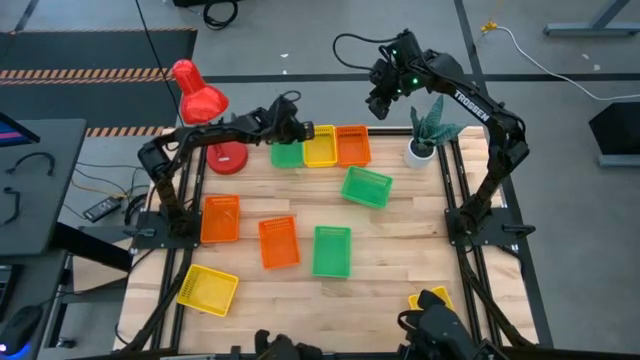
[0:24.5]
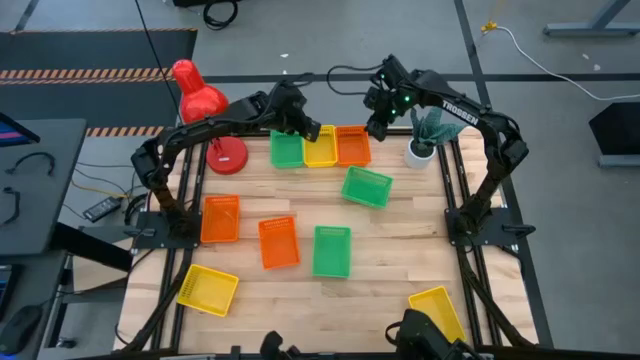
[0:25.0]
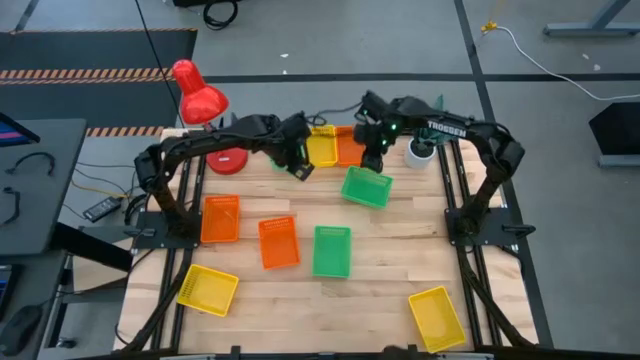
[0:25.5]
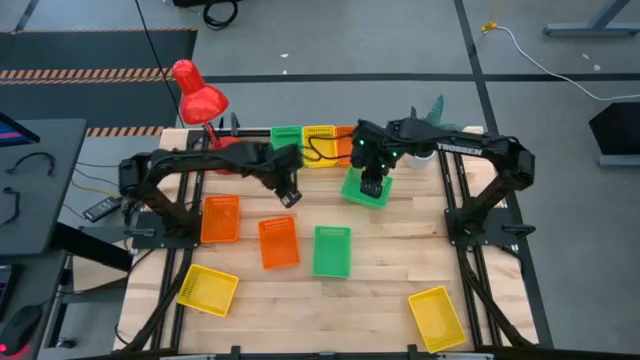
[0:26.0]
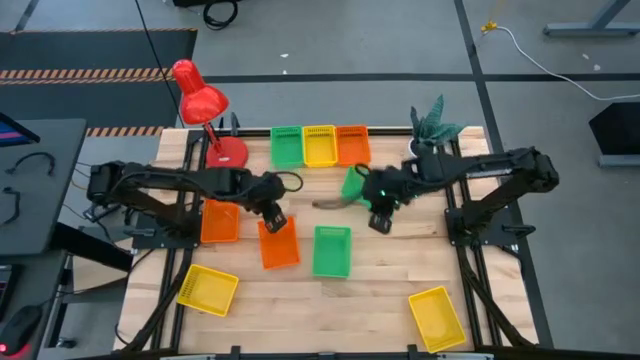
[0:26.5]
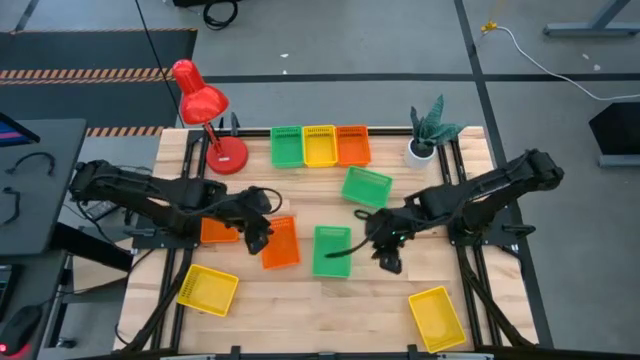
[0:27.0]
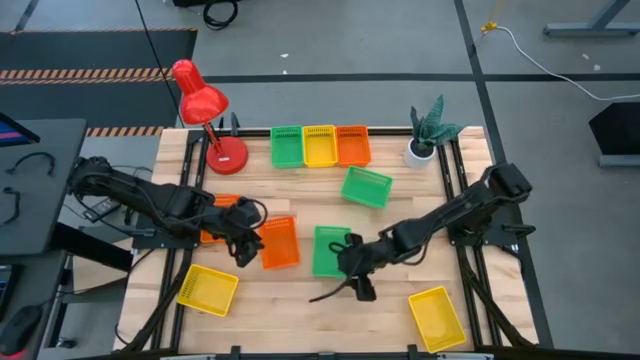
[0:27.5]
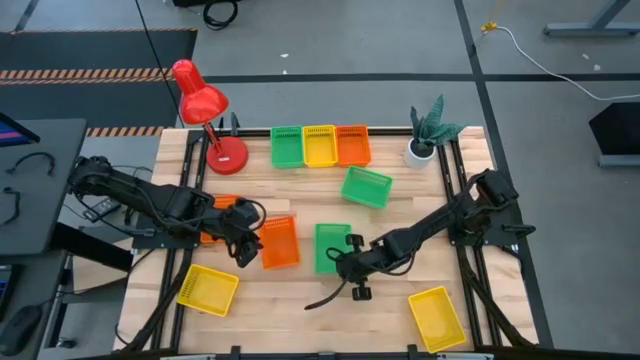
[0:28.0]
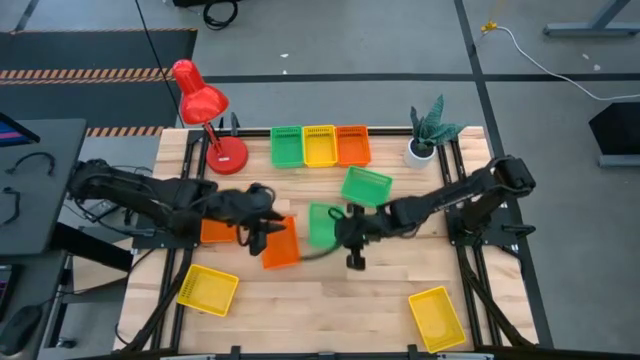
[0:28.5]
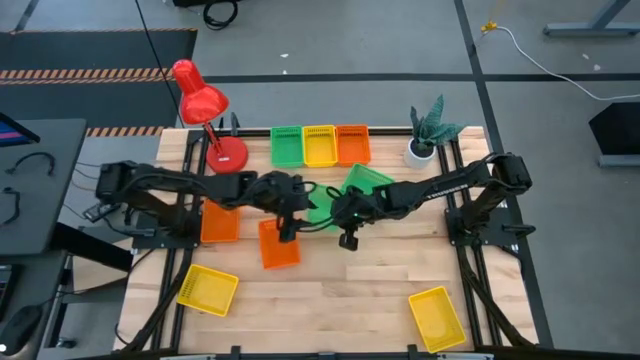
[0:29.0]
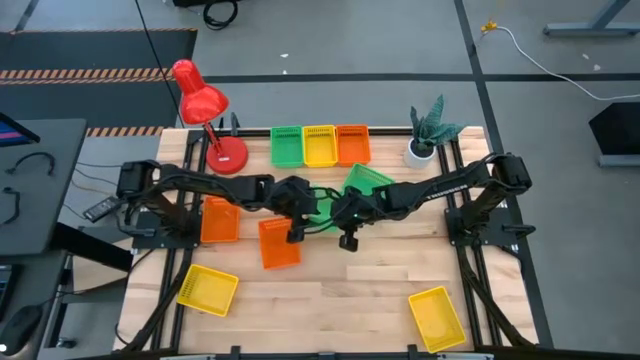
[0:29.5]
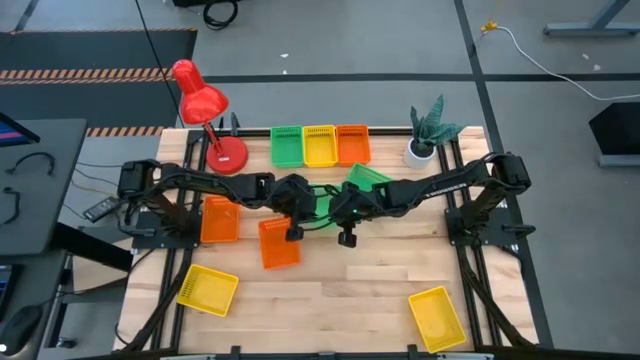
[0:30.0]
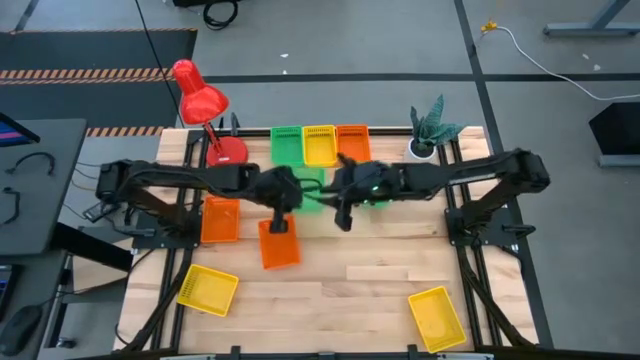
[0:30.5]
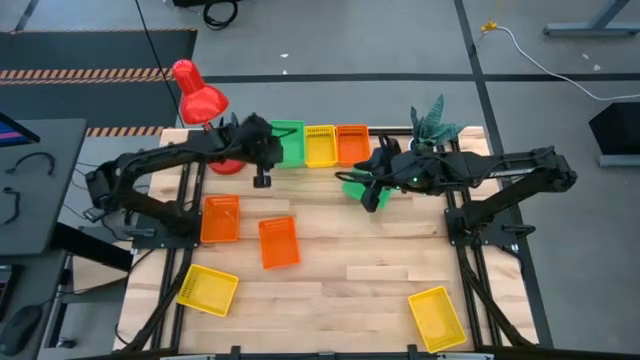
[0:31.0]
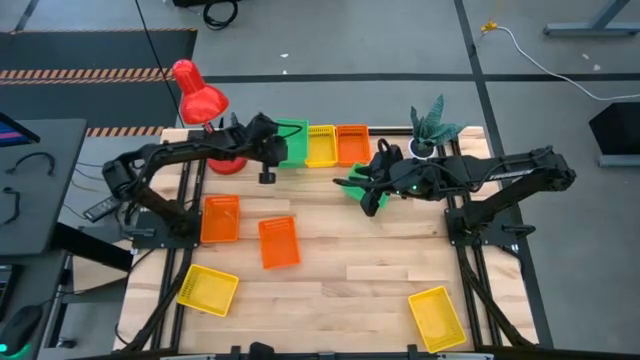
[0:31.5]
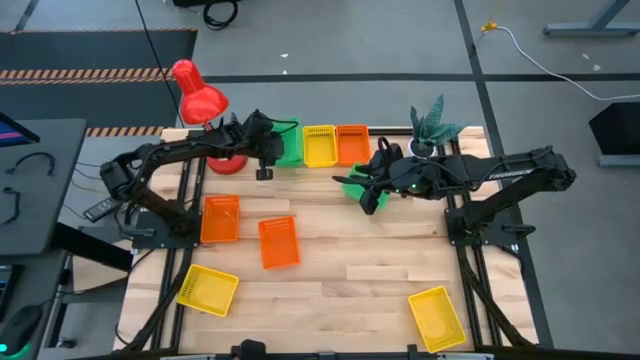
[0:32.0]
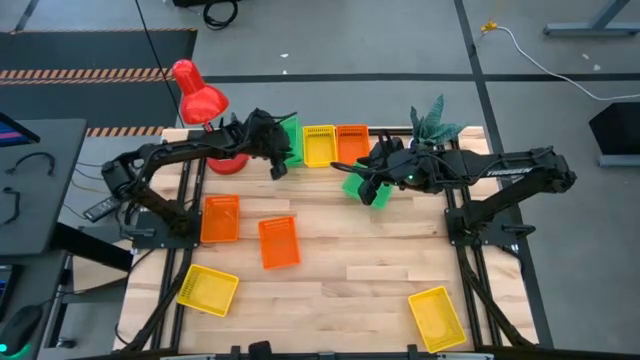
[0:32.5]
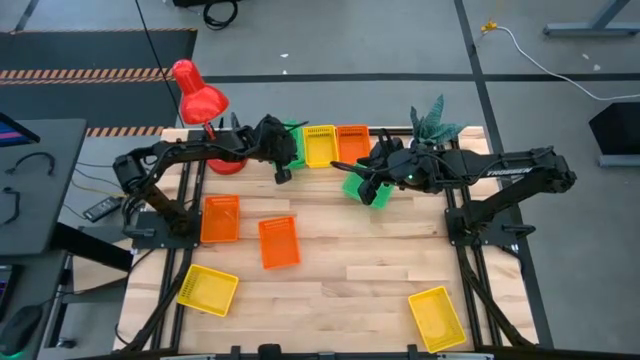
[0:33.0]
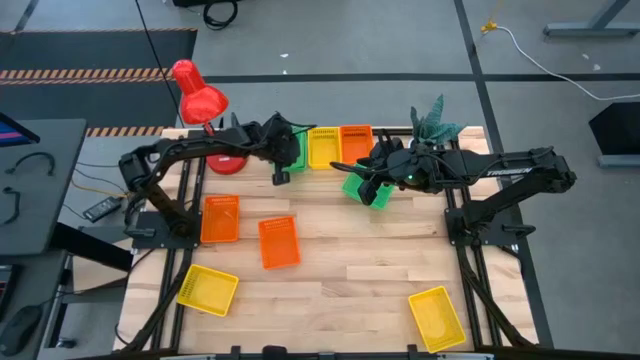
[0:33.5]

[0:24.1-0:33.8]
Stack the bottom green bin on top of the top green bin

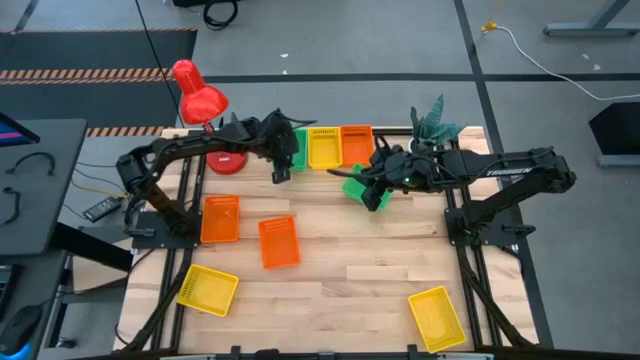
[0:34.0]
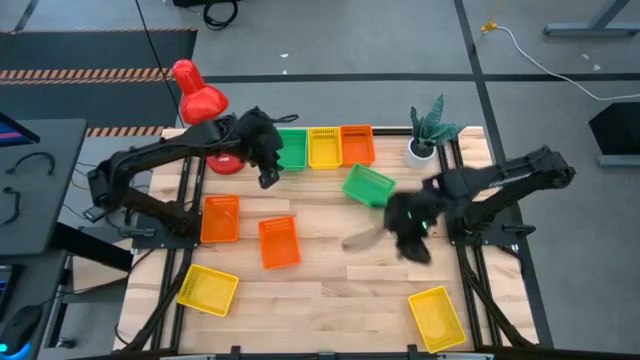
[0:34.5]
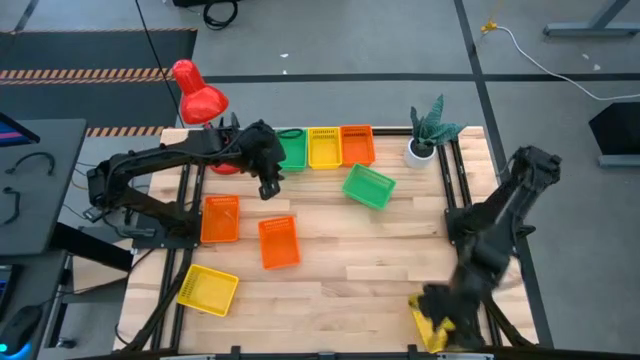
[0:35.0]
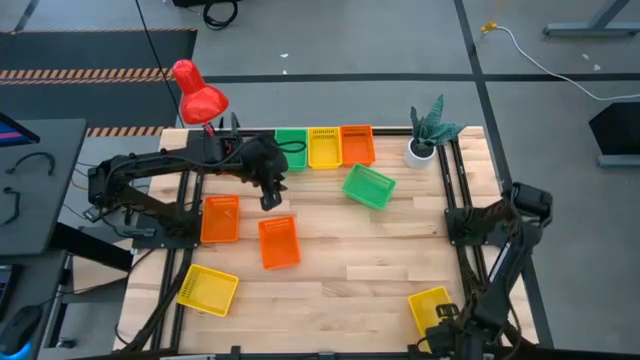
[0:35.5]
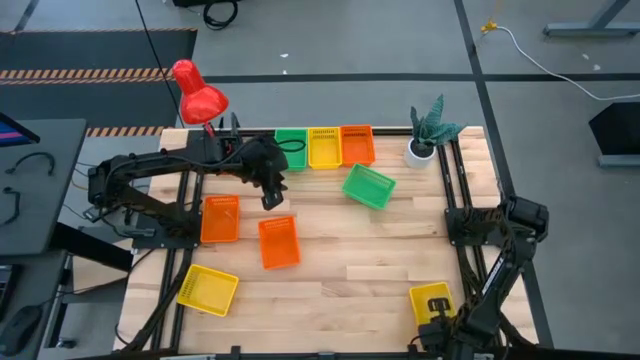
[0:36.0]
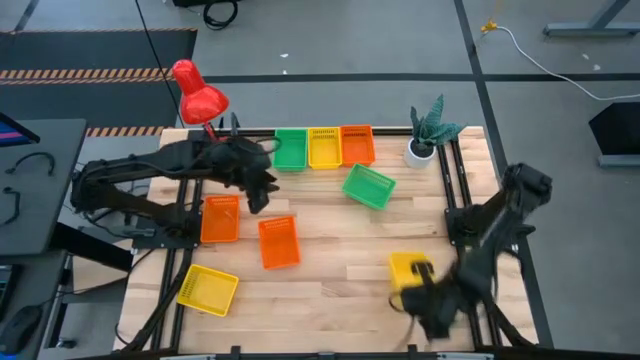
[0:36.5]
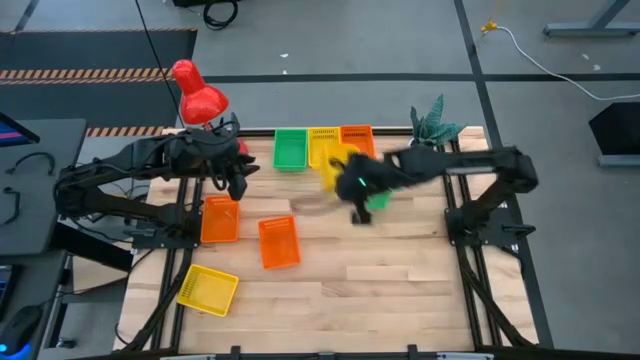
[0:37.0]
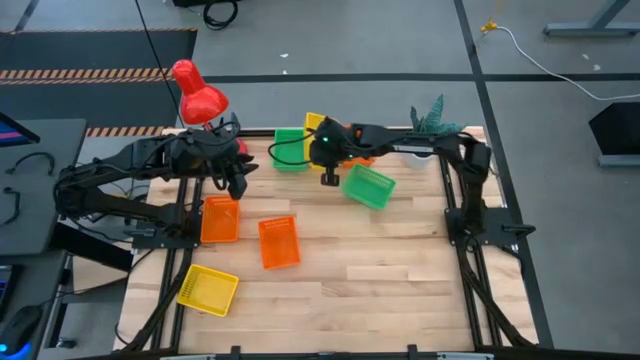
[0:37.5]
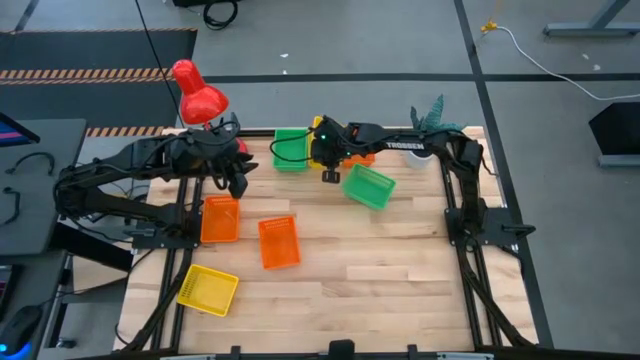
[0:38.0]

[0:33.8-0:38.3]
Stack the bottom right yellow bin on top of the top yellow bin

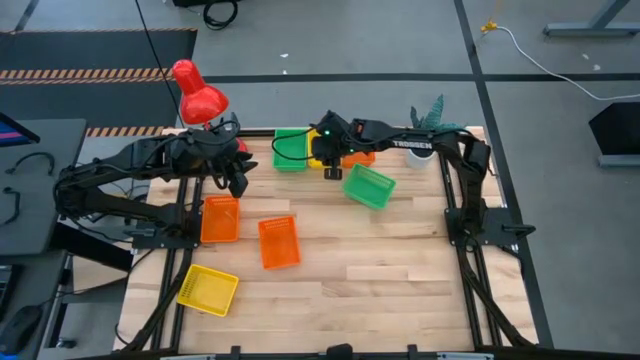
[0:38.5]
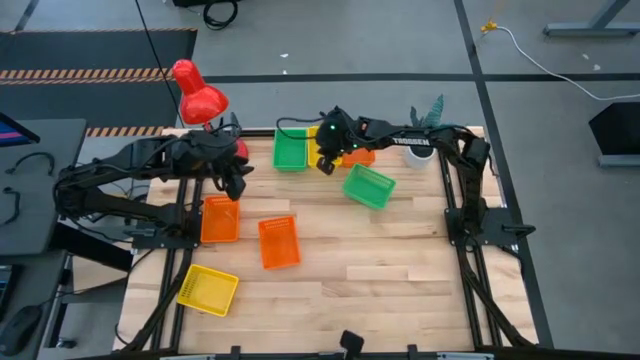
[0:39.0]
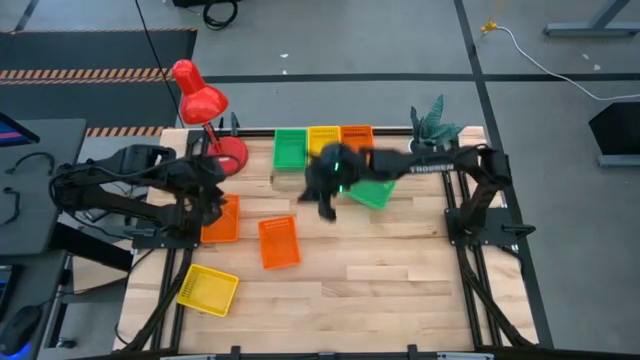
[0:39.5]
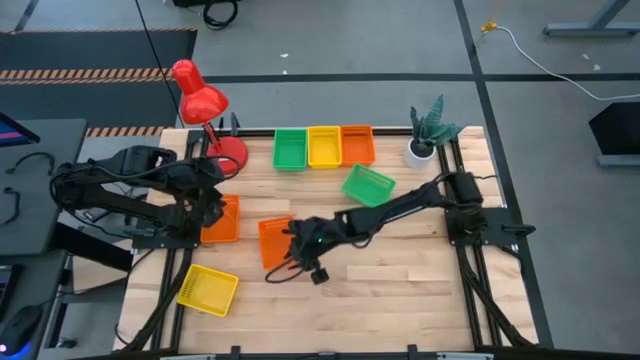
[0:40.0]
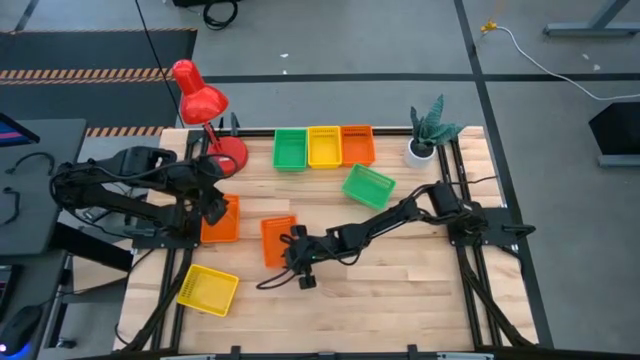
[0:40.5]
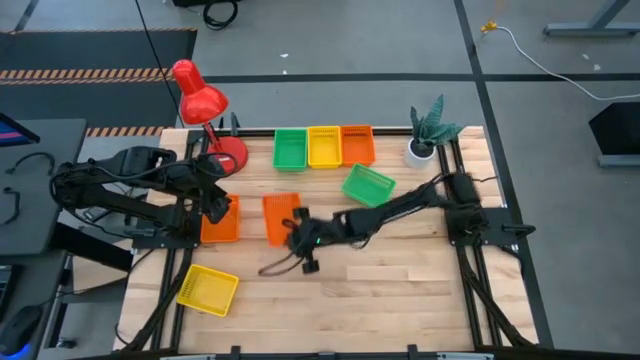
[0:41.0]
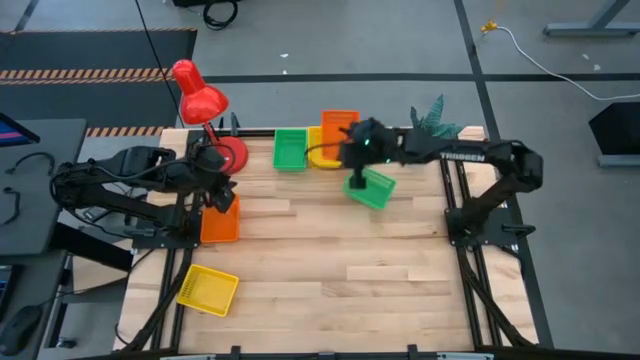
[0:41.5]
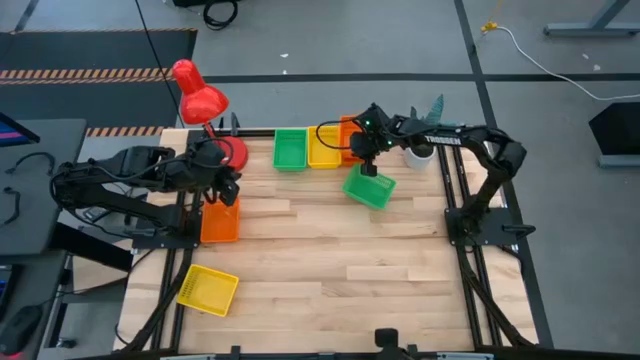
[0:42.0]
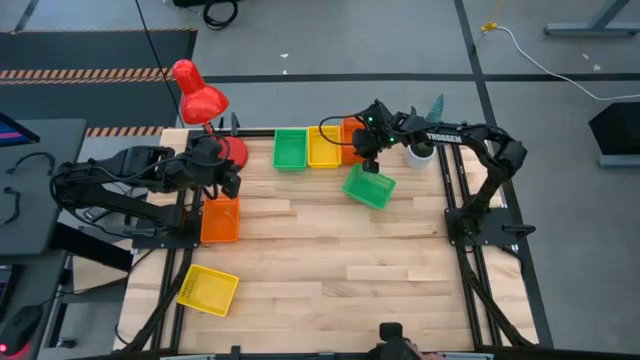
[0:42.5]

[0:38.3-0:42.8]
Stack the bottom right orange bin on top of the top orange bin

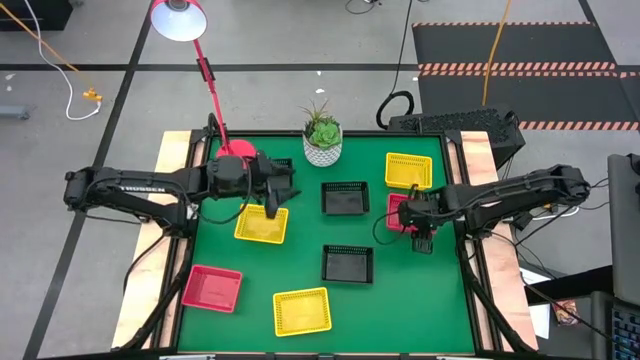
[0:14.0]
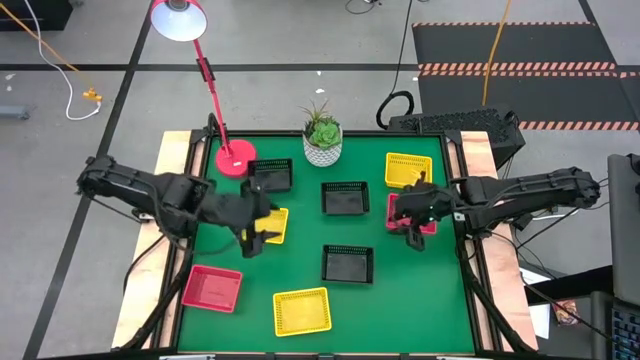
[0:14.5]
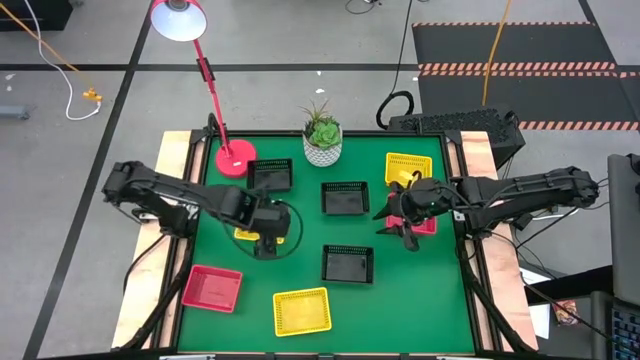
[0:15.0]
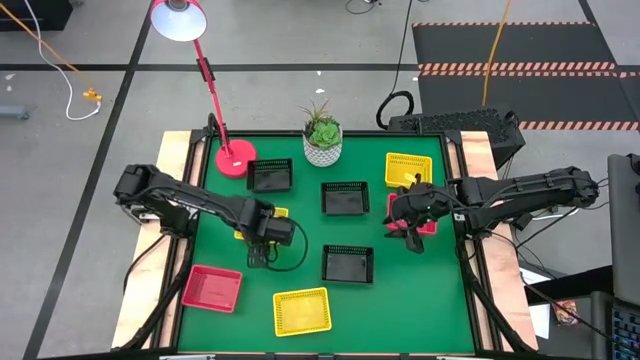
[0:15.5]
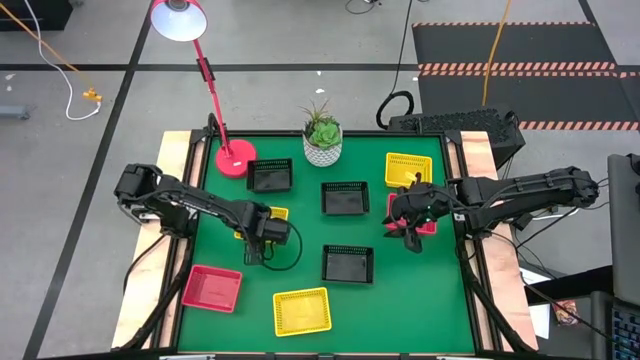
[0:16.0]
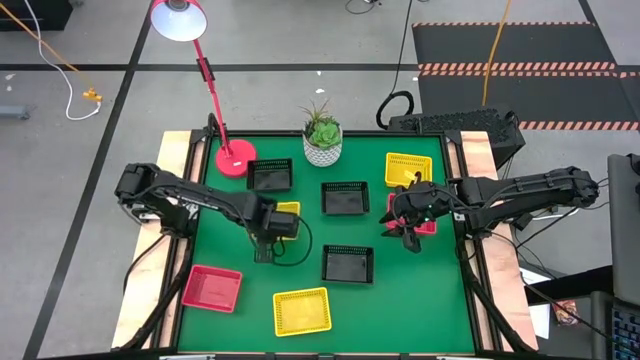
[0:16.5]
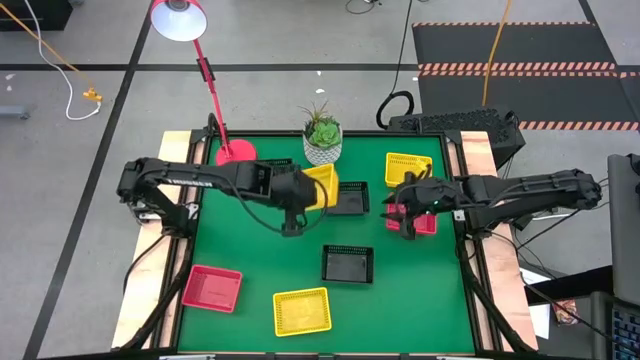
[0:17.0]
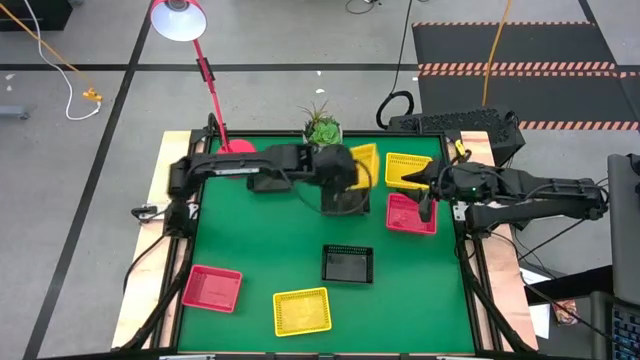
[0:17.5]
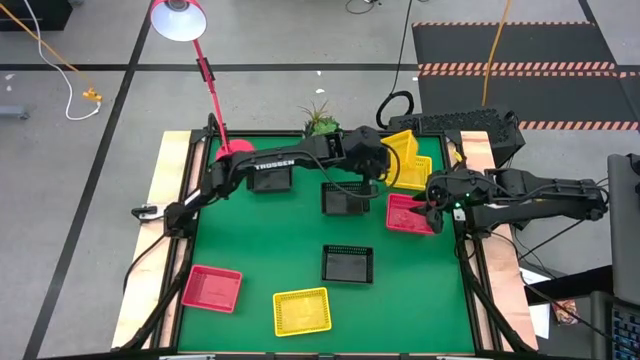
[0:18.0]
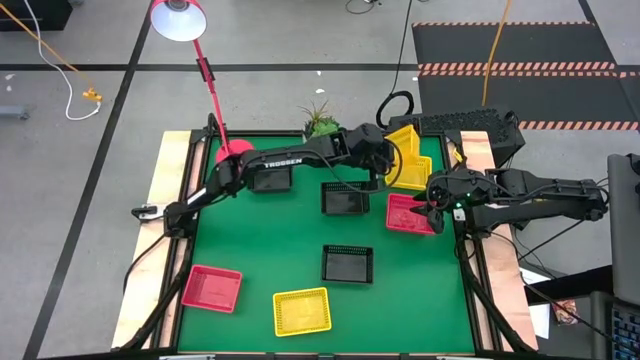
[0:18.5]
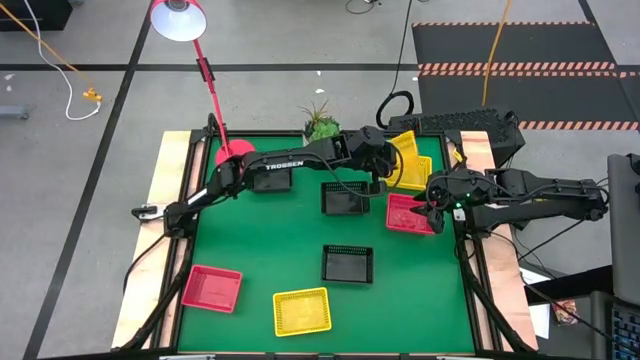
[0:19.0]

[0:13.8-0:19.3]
Stack the left yellow bin on top of the top yellow bin
